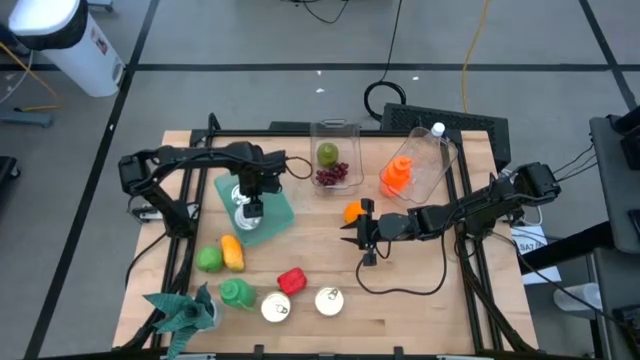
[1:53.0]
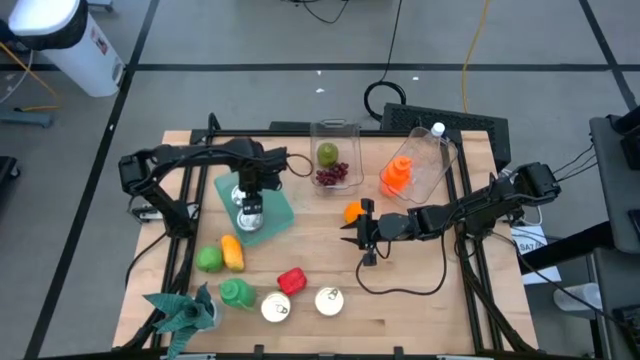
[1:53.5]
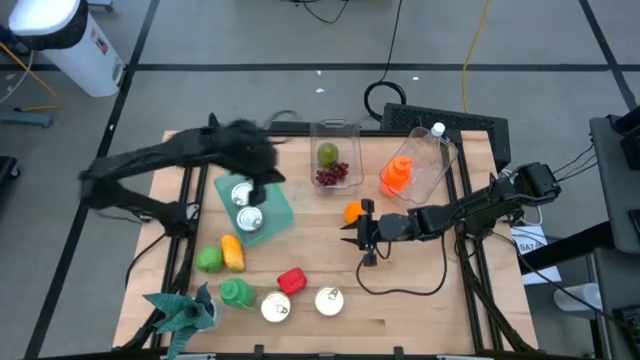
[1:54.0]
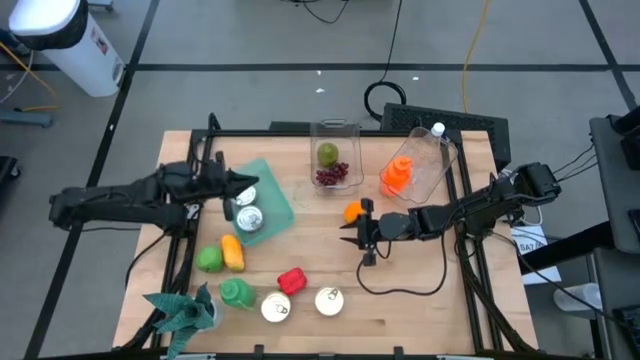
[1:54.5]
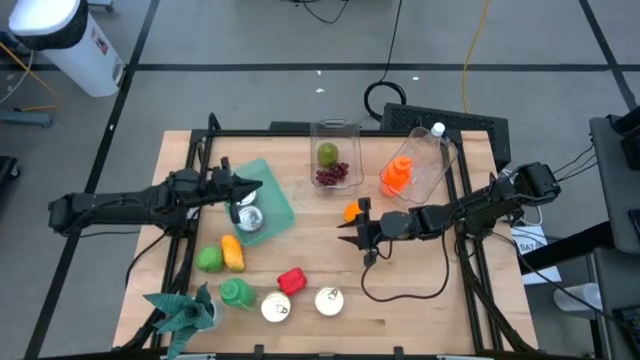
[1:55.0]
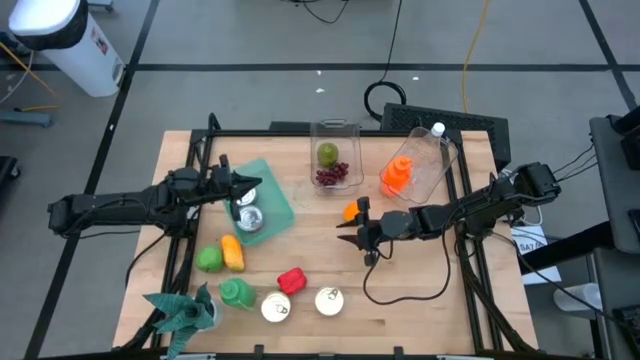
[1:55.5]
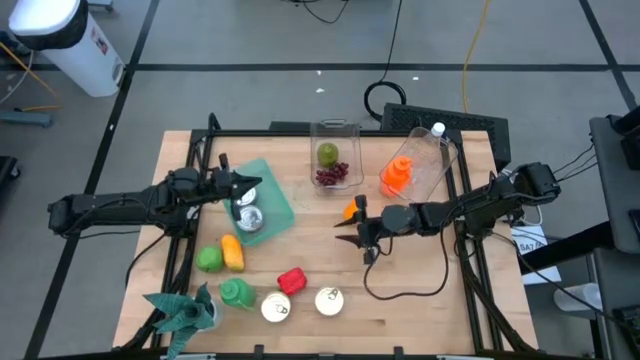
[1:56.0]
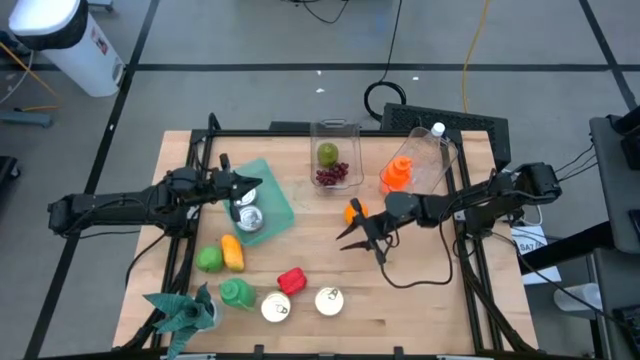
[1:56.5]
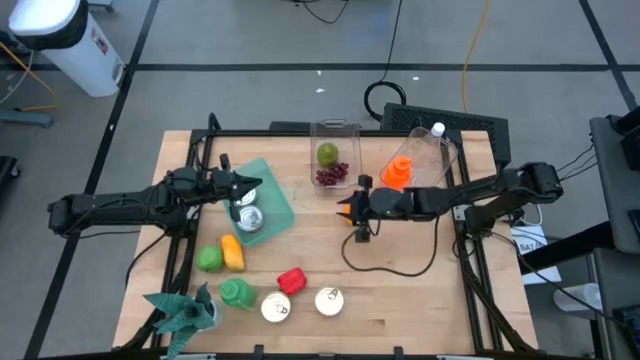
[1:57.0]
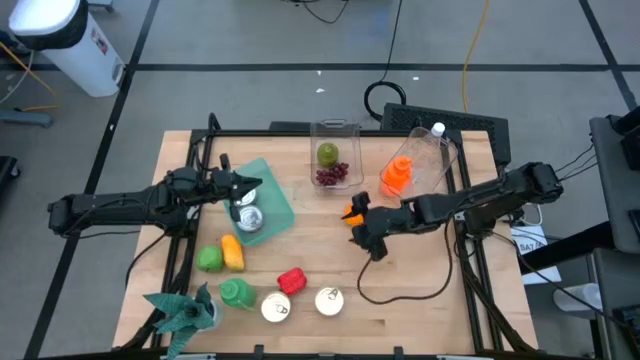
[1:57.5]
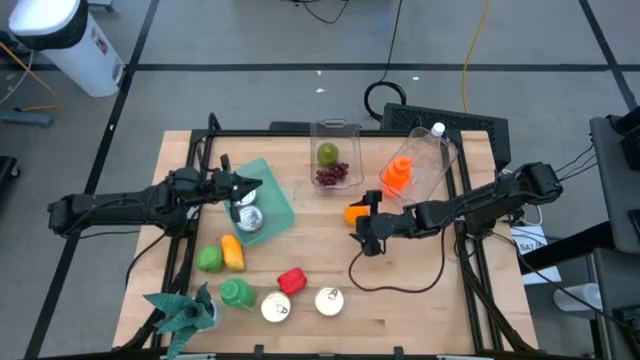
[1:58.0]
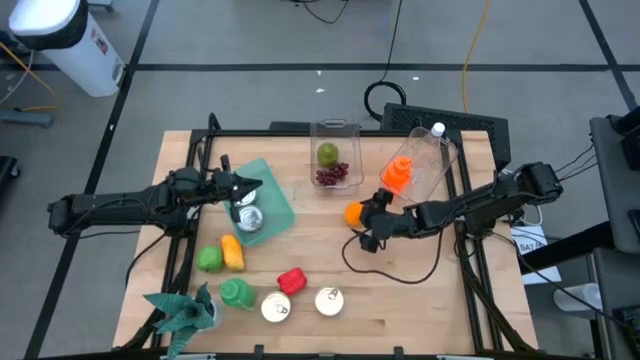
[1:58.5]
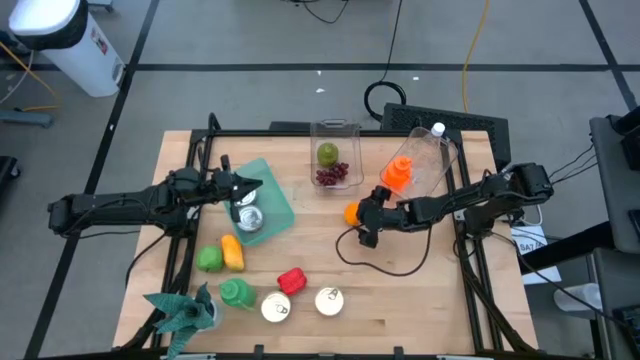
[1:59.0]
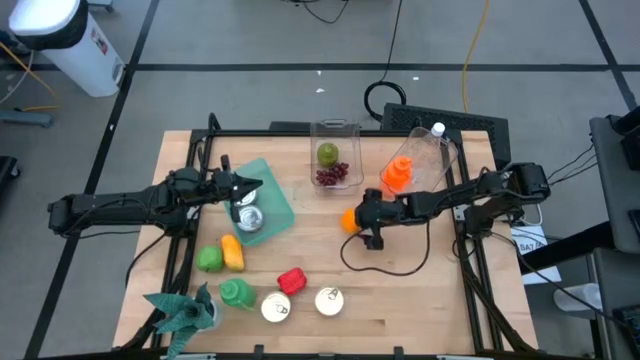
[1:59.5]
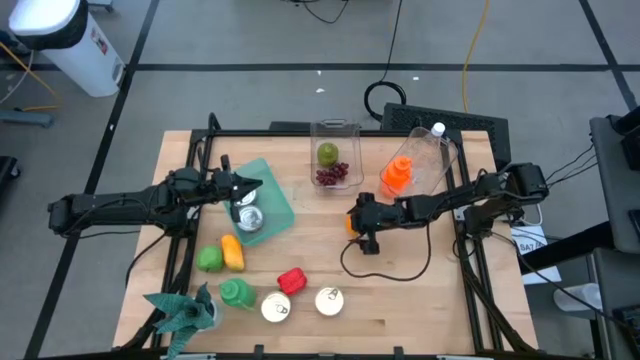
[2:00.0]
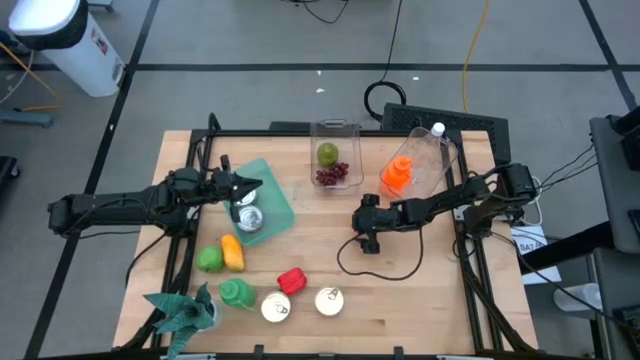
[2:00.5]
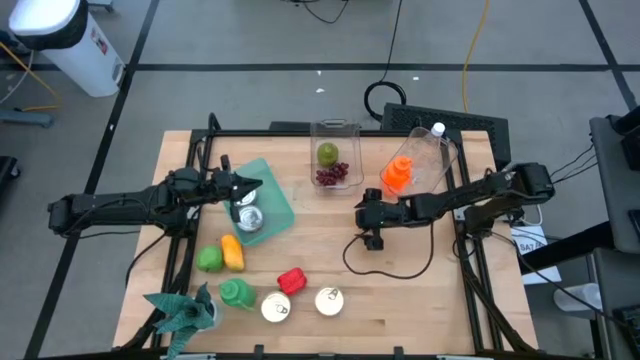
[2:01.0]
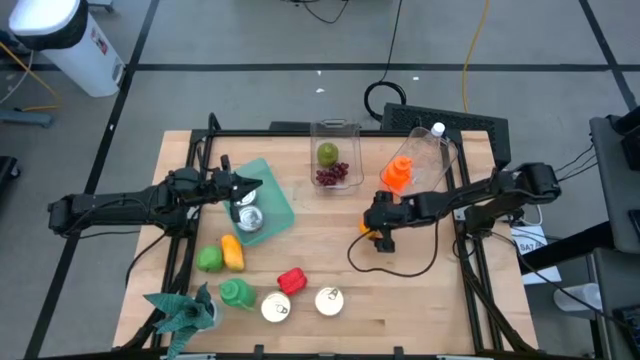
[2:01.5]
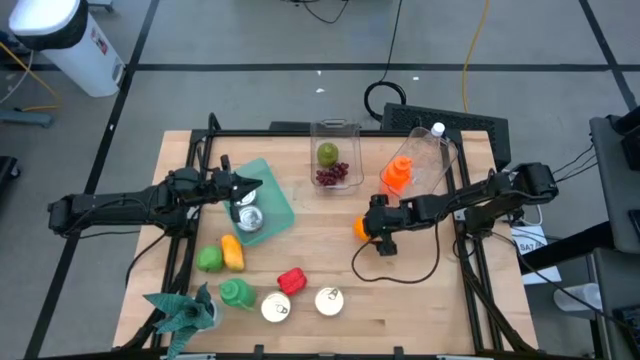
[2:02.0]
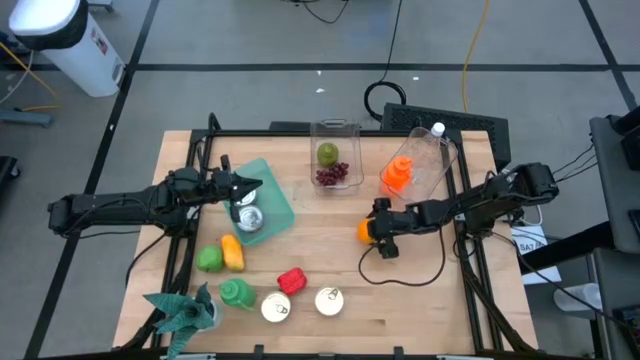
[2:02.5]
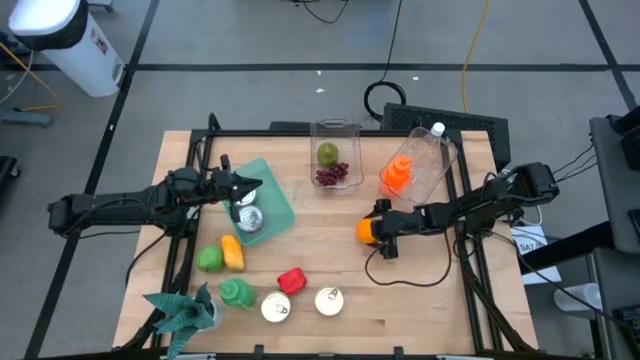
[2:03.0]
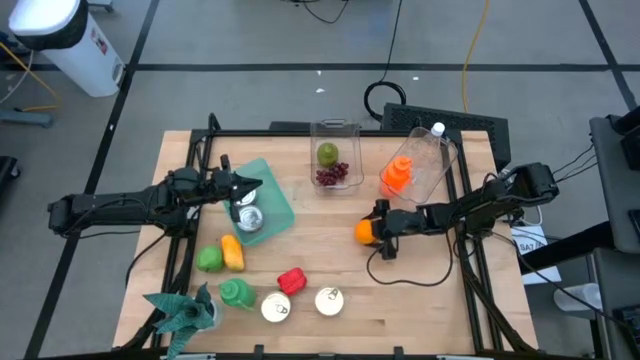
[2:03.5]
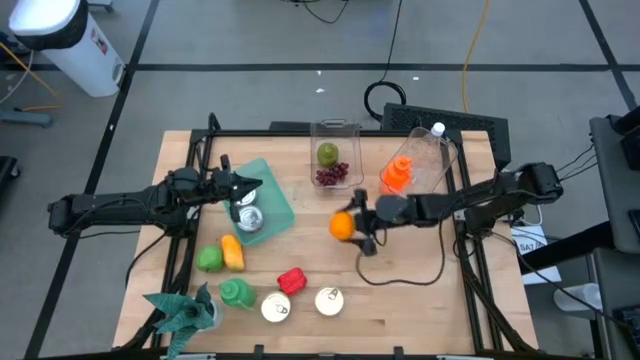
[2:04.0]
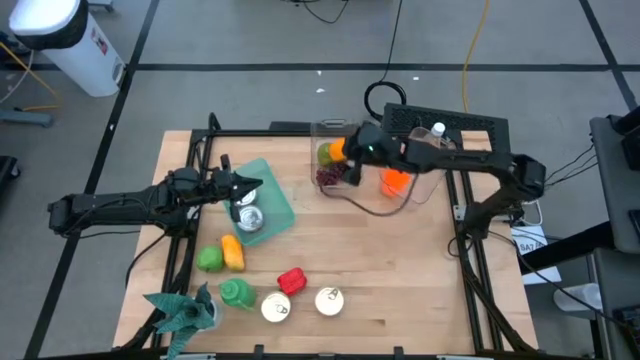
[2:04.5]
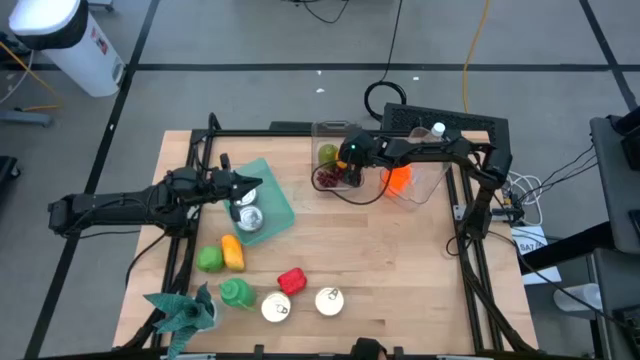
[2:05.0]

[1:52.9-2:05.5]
Task: Pick & Place Food Item
Put the orange into the left transparent bin
